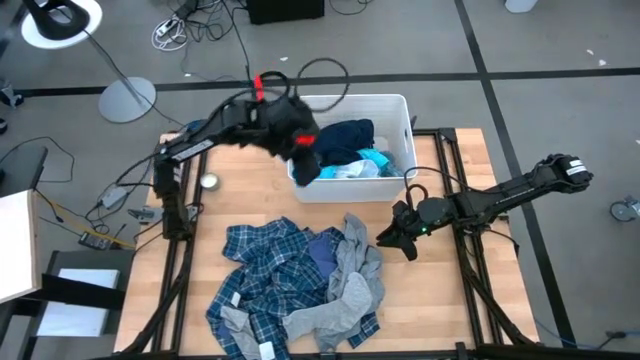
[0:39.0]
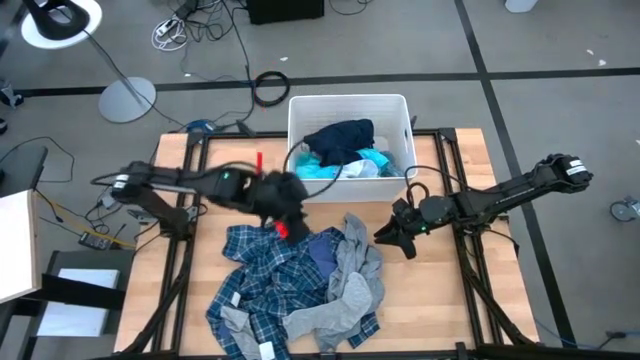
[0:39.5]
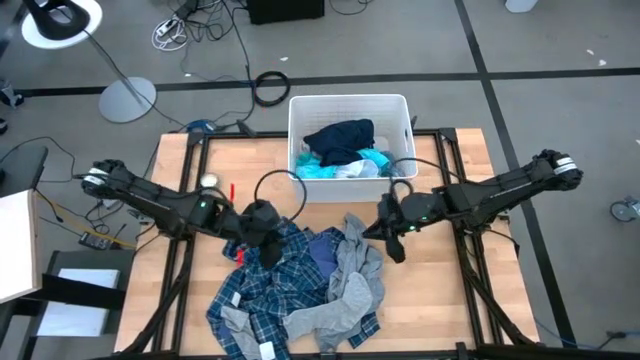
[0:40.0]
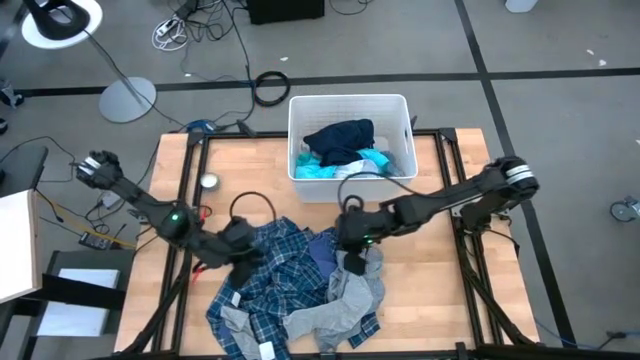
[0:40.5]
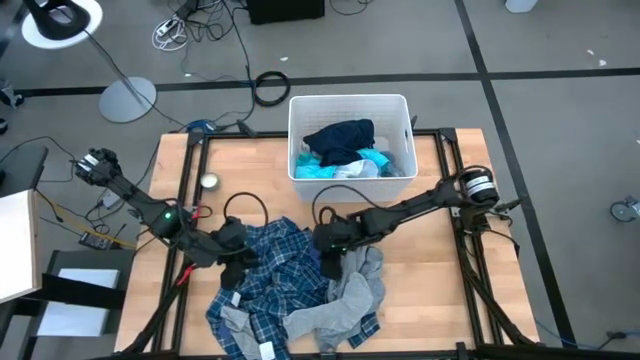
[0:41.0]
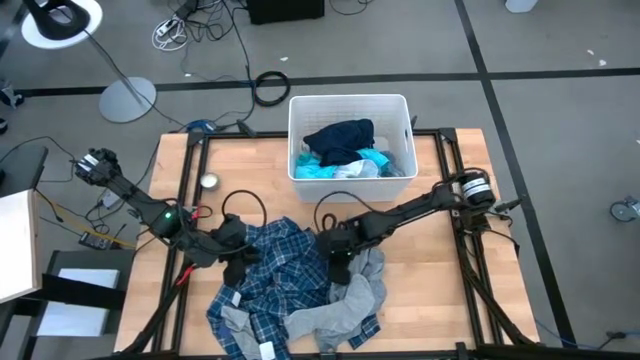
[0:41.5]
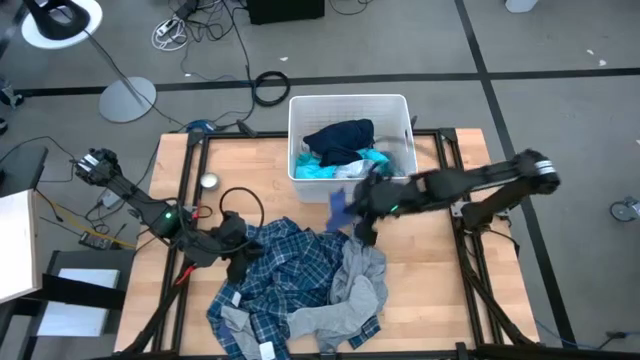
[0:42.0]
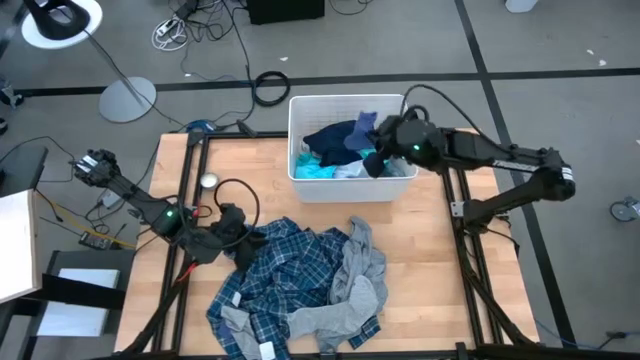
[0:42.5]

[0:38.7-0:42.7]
Task: Sort clothes
Put the purple sock into the white laundry bin

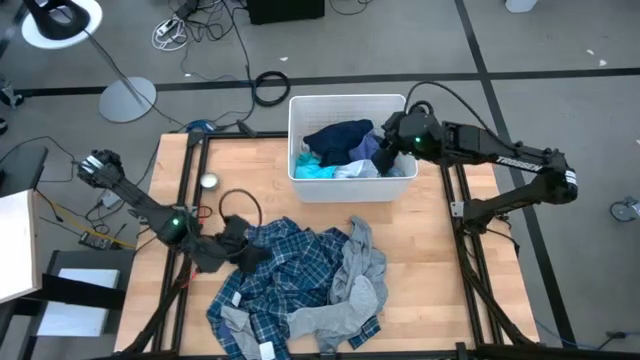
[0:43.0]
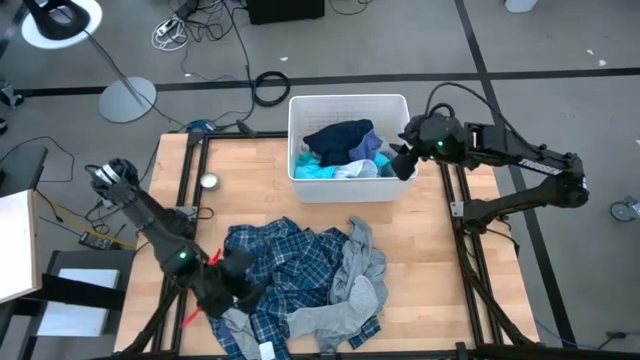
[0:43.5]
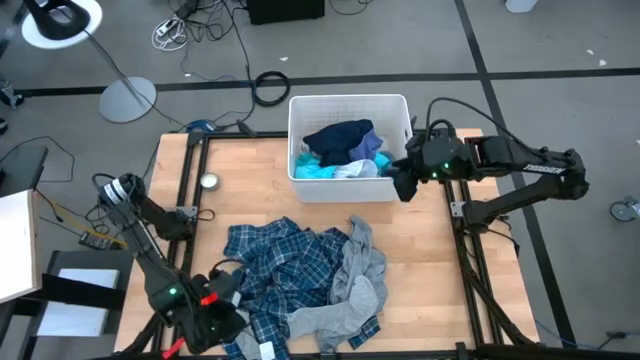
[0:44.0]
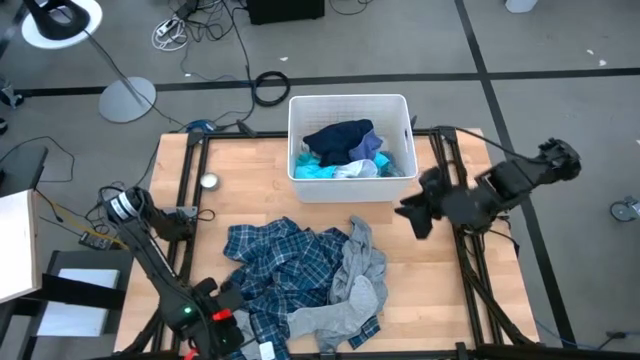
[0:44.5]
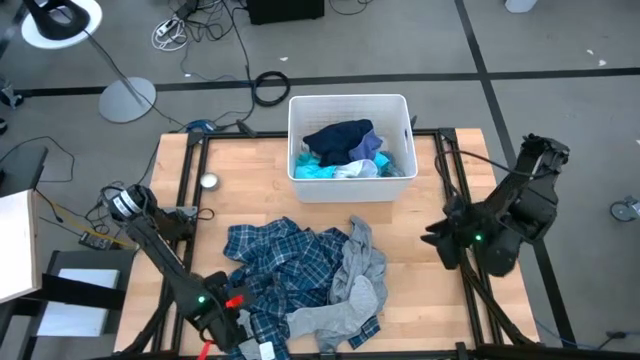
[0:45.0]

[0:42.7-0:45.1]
Put the gray sock into the white laundry bin

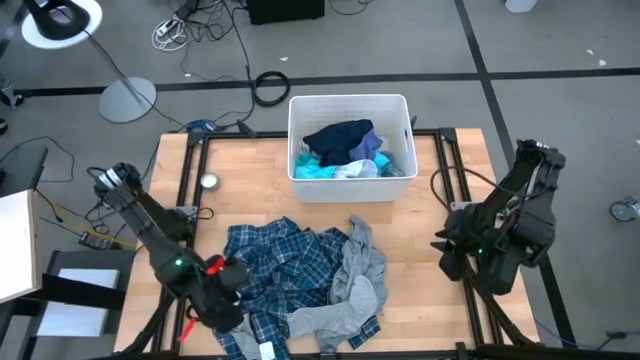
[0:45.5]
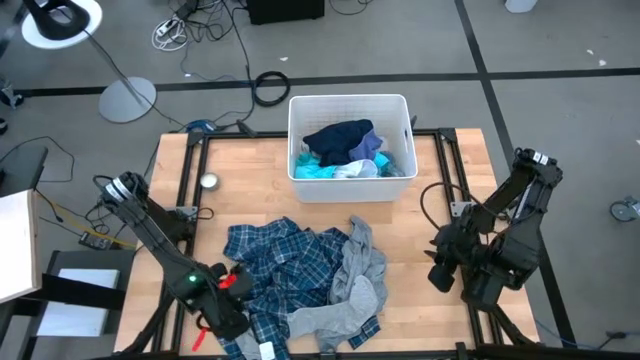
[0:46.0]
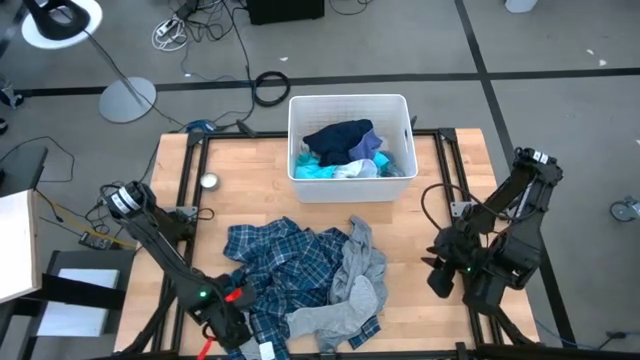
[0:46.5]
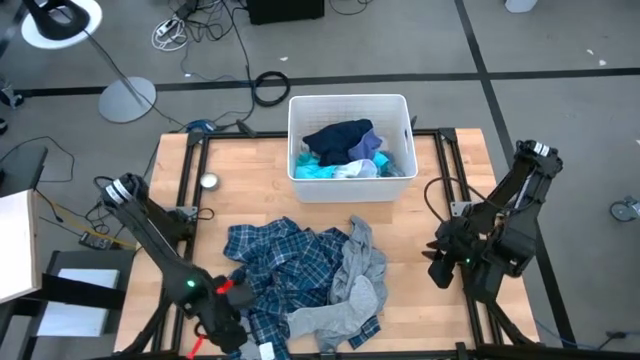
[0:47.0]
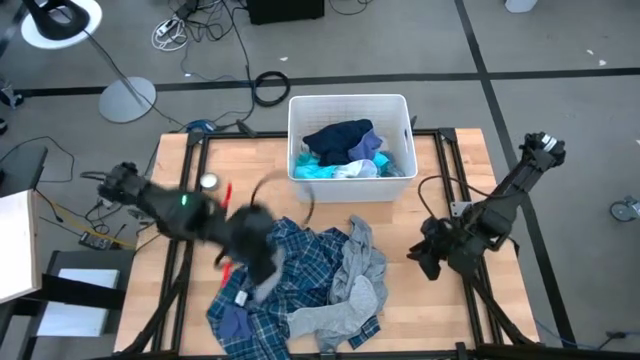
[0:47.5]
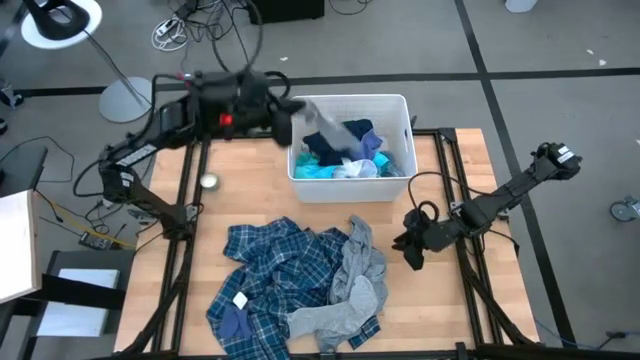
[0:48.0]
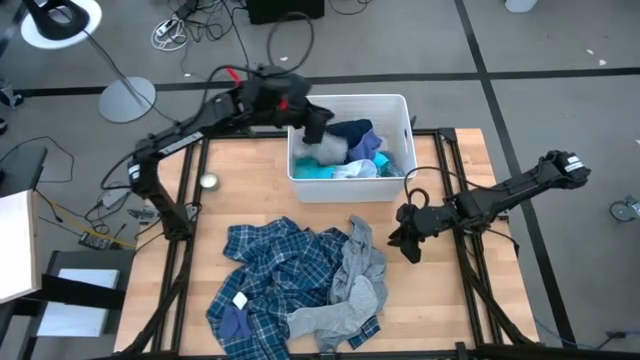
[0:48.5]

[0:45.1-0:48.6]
Put the gray sock into the white laundry bin

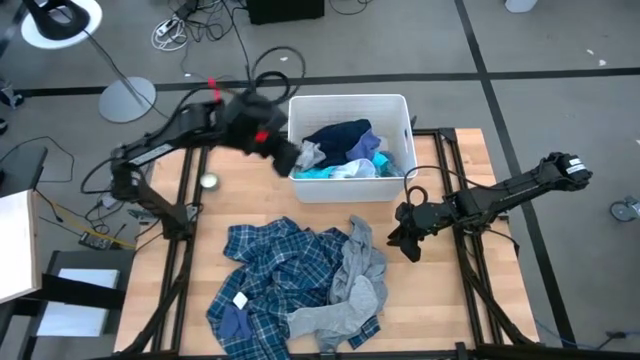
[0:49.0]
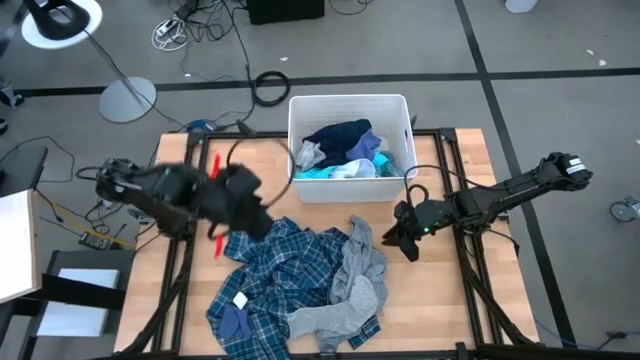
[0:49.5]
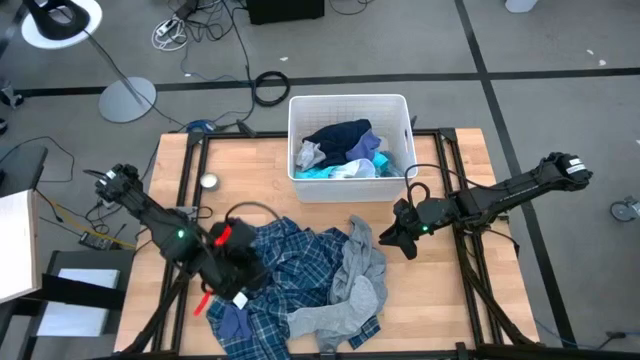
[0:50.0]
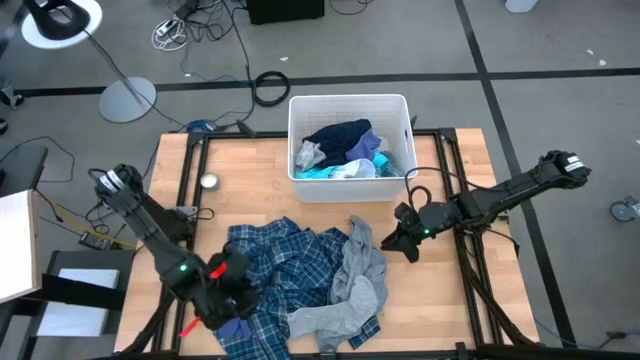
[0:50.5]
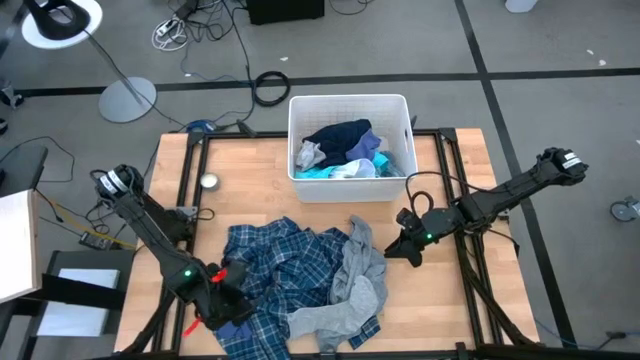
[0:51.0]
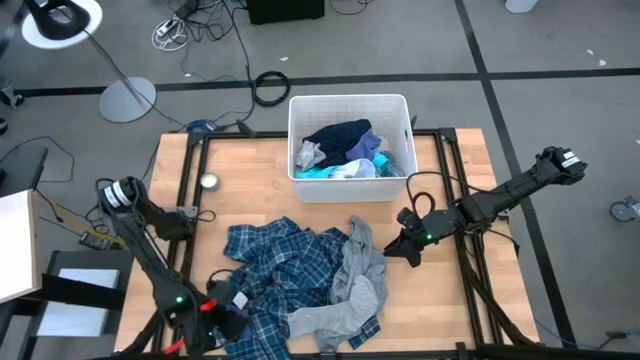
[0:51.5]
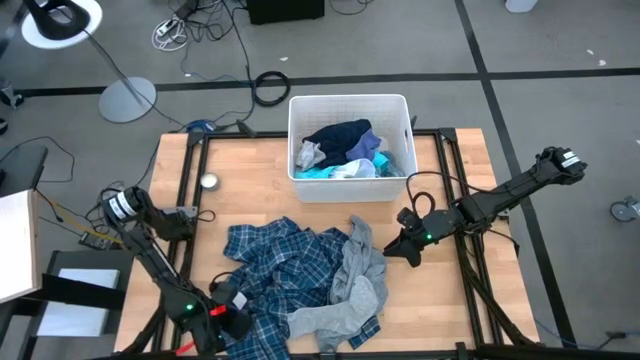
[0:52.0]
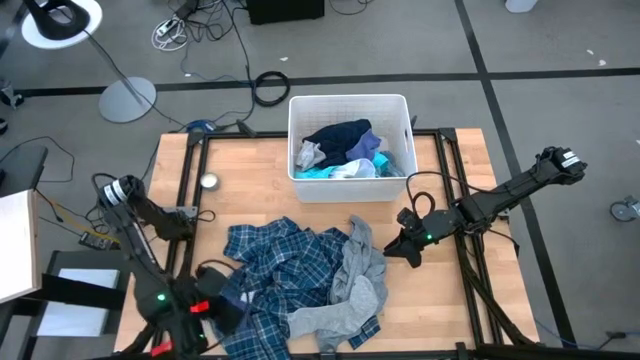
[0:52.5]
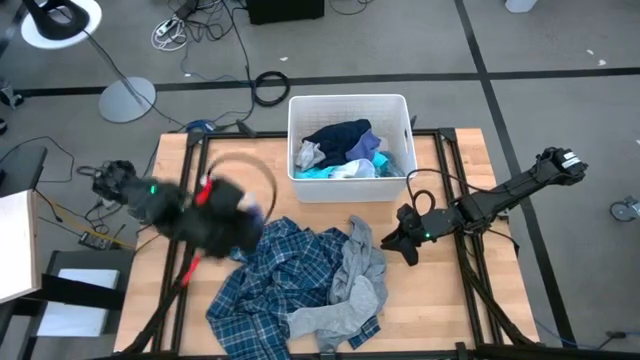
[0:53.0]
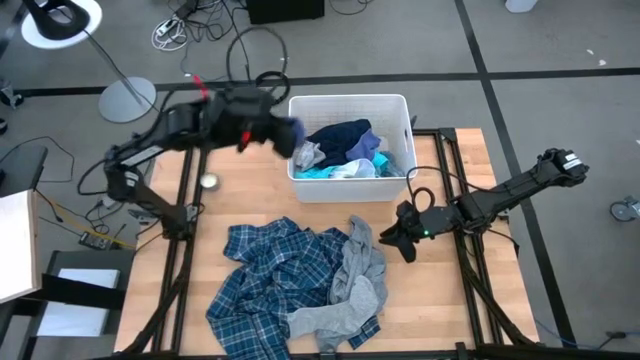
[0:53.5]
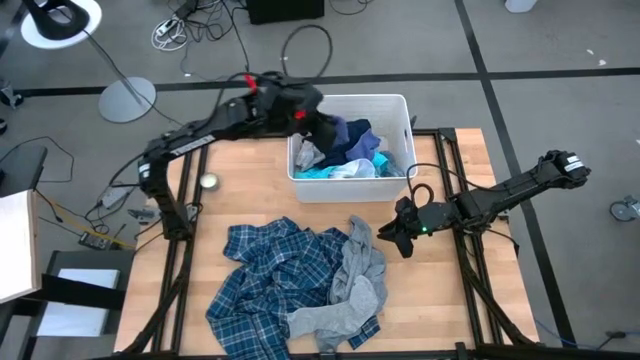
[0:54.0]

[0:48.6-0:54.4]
Put the purple sock into the white laundry bin

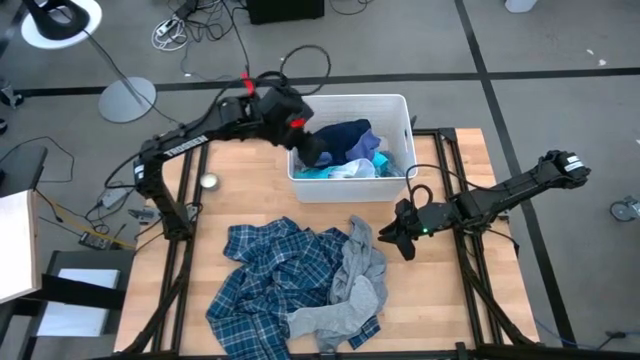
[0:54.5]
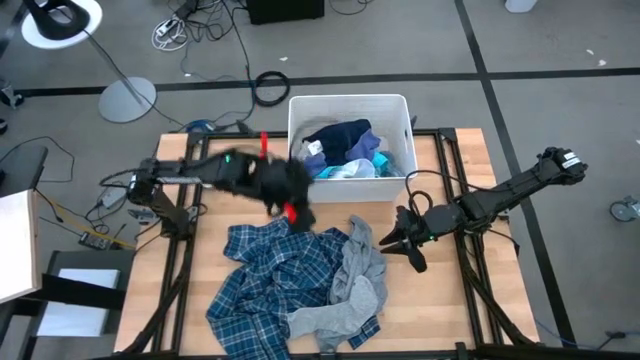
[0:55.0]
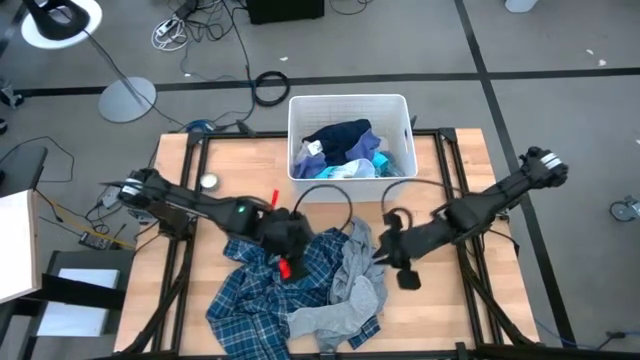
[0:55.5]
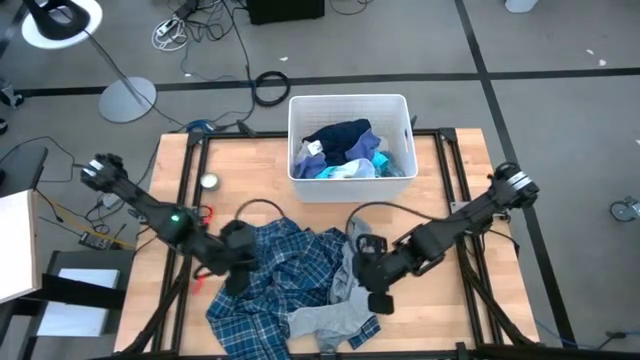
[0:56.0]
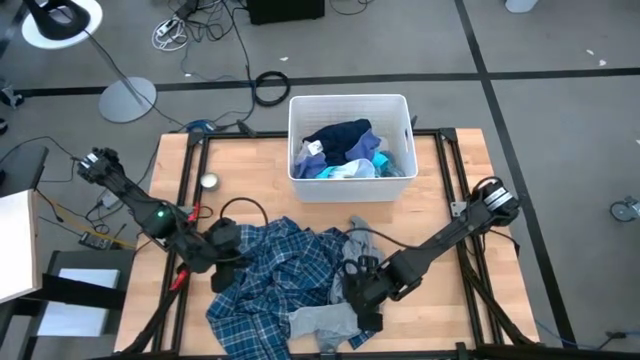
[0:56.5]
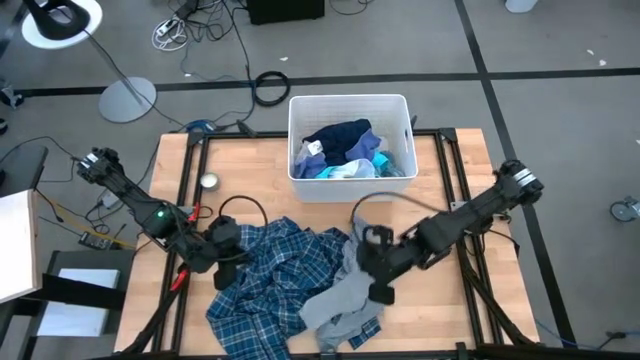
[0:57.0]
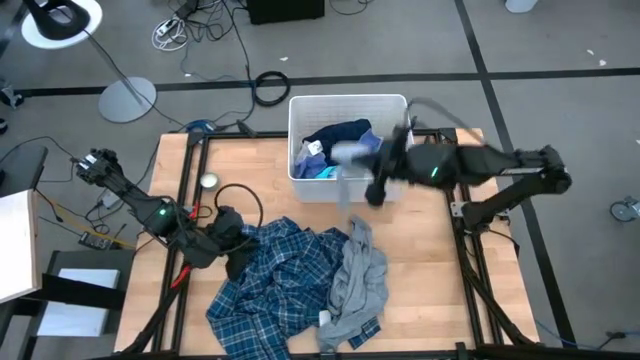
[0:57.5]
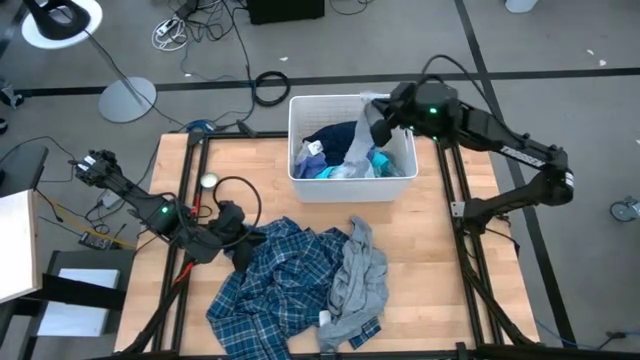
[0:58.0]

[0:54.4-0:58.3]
Put the gray sock into the white laundry bin
